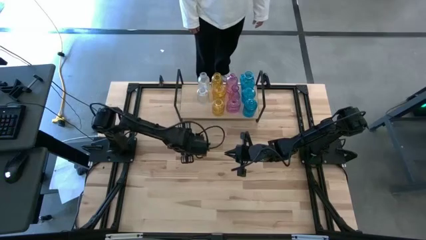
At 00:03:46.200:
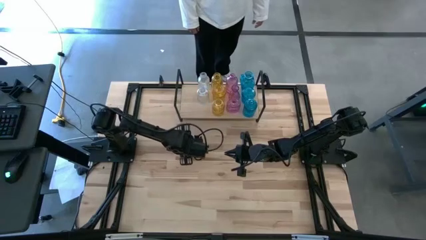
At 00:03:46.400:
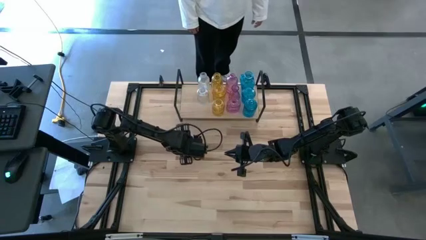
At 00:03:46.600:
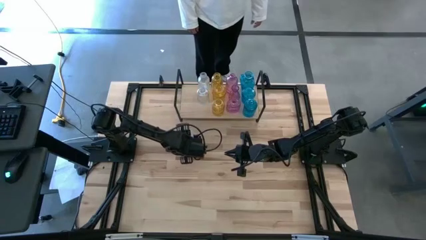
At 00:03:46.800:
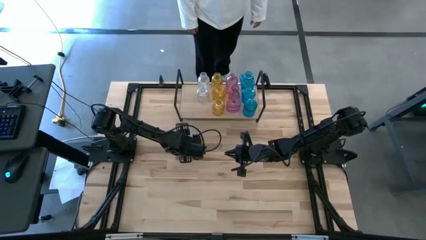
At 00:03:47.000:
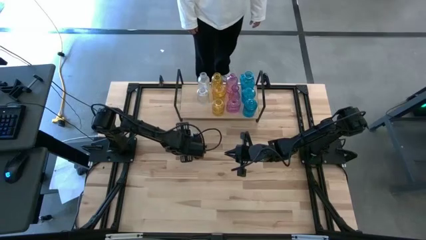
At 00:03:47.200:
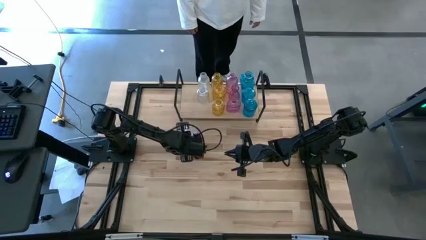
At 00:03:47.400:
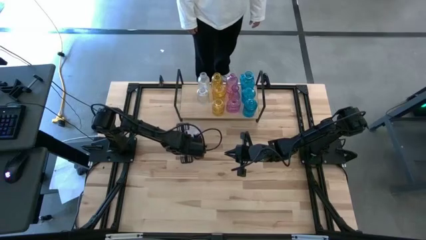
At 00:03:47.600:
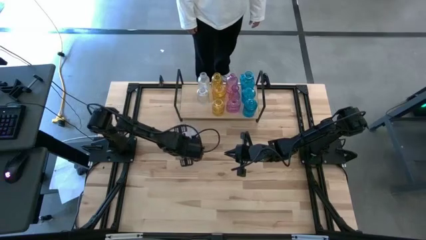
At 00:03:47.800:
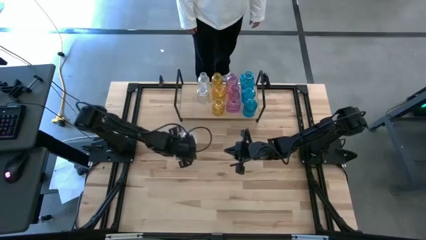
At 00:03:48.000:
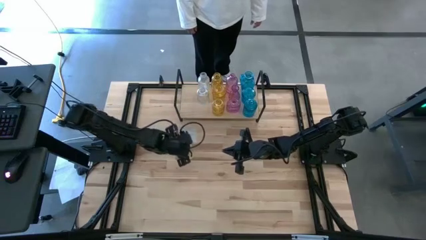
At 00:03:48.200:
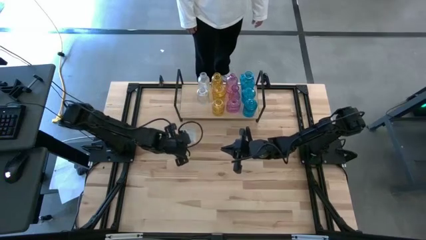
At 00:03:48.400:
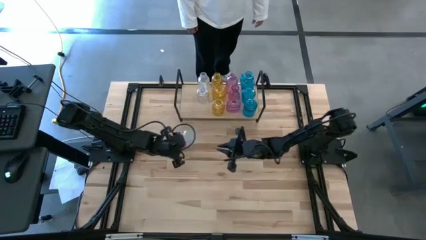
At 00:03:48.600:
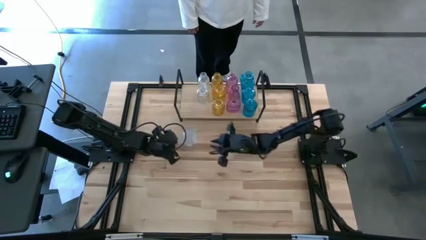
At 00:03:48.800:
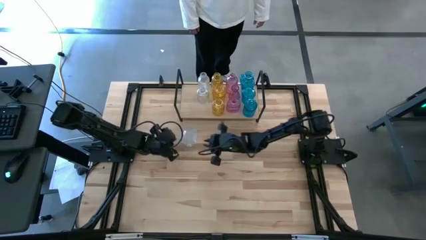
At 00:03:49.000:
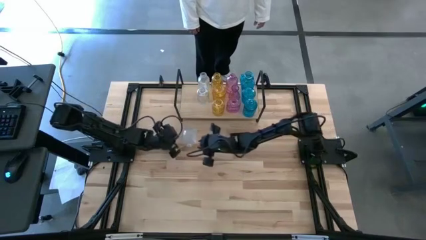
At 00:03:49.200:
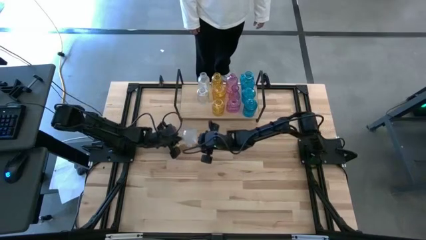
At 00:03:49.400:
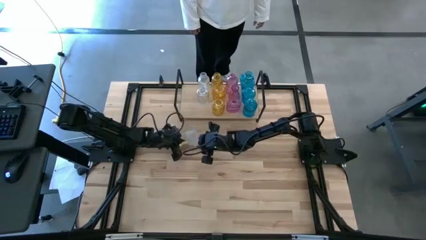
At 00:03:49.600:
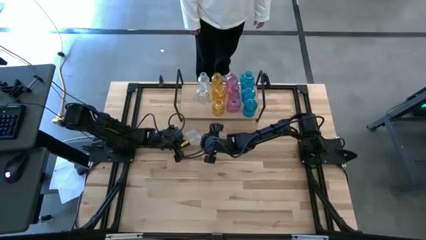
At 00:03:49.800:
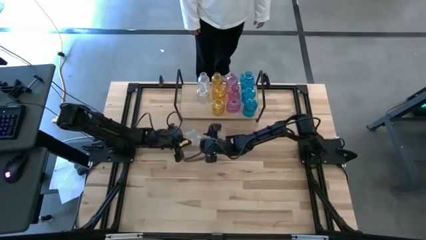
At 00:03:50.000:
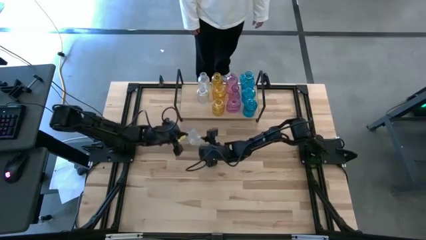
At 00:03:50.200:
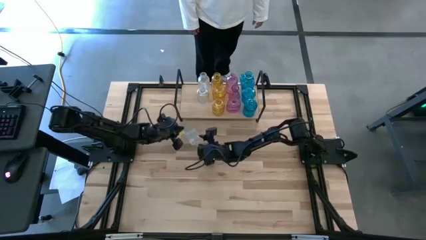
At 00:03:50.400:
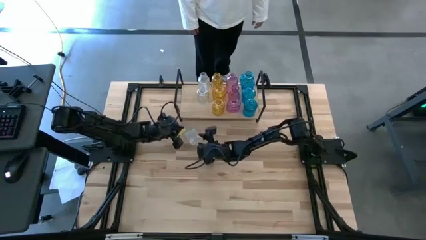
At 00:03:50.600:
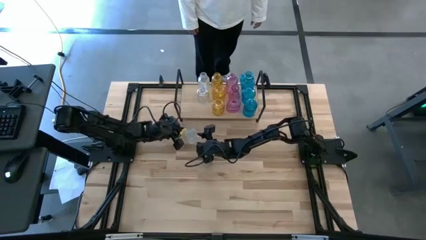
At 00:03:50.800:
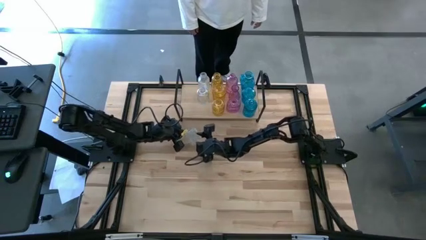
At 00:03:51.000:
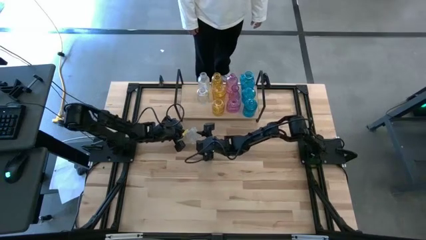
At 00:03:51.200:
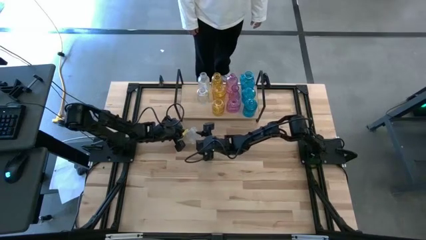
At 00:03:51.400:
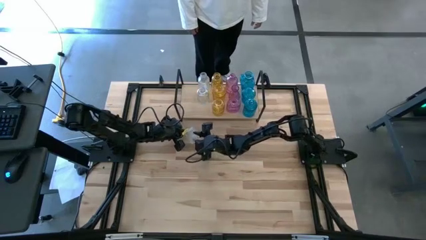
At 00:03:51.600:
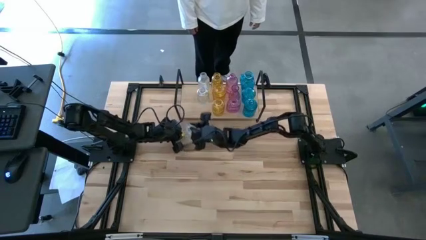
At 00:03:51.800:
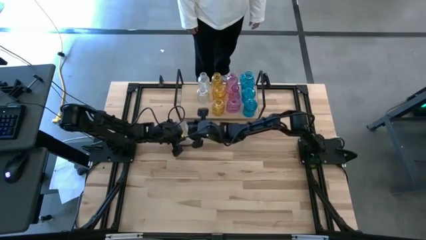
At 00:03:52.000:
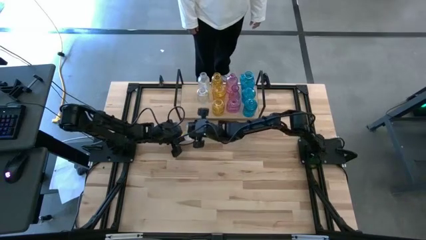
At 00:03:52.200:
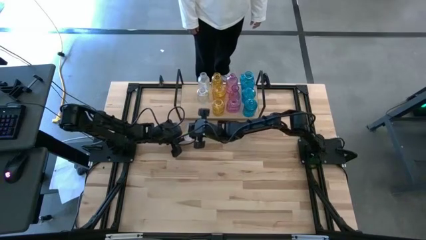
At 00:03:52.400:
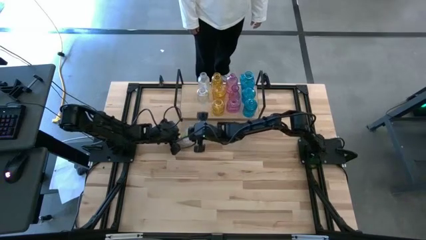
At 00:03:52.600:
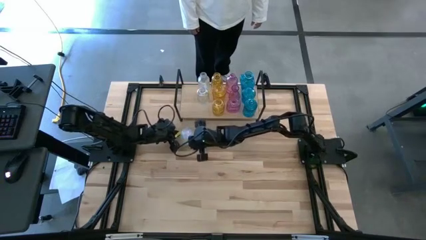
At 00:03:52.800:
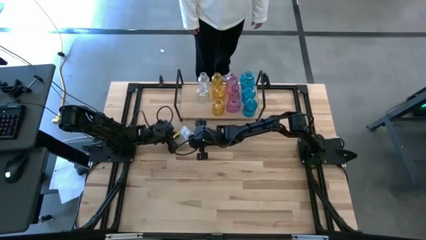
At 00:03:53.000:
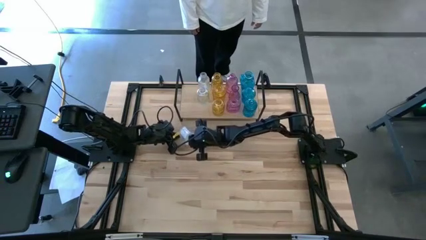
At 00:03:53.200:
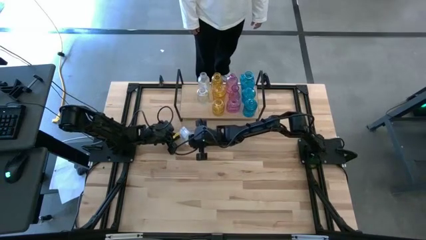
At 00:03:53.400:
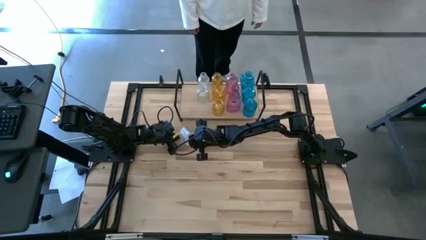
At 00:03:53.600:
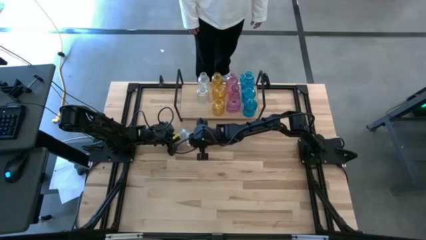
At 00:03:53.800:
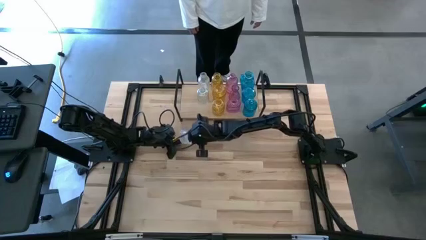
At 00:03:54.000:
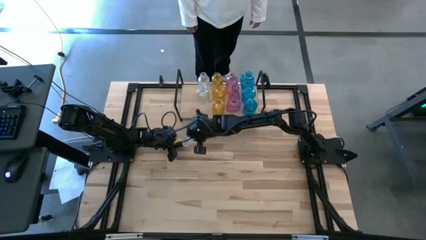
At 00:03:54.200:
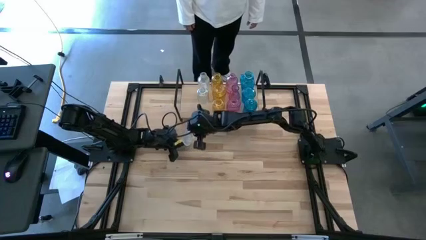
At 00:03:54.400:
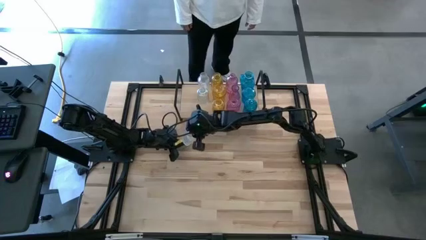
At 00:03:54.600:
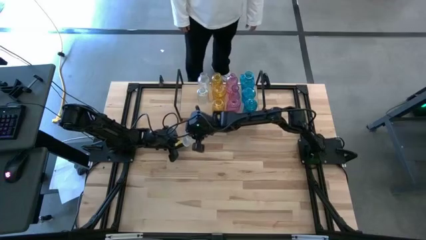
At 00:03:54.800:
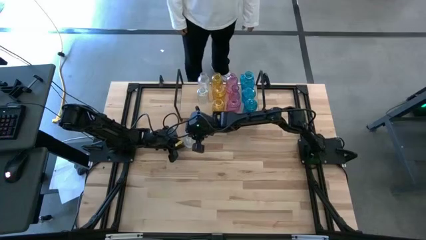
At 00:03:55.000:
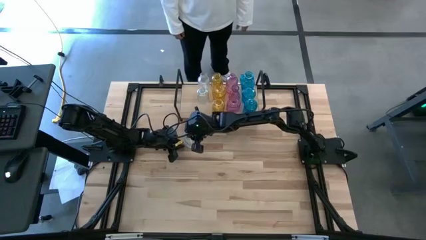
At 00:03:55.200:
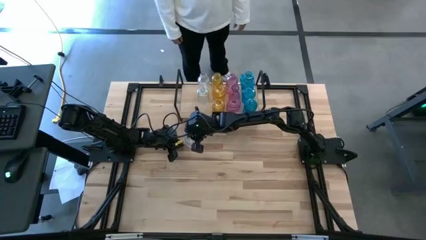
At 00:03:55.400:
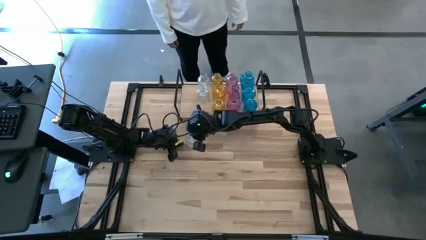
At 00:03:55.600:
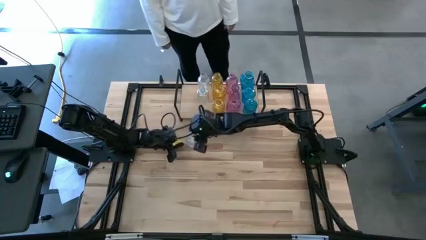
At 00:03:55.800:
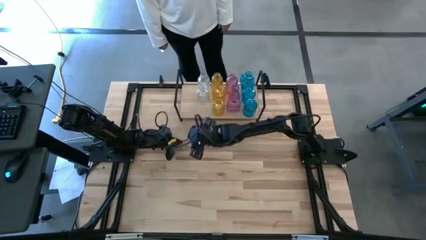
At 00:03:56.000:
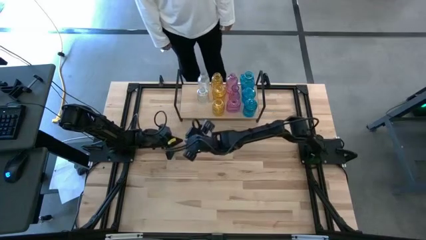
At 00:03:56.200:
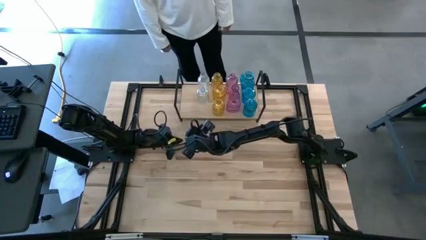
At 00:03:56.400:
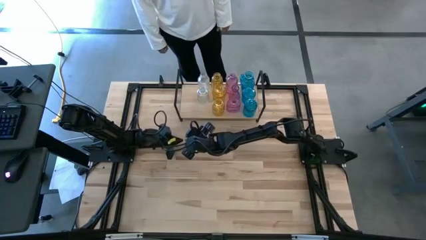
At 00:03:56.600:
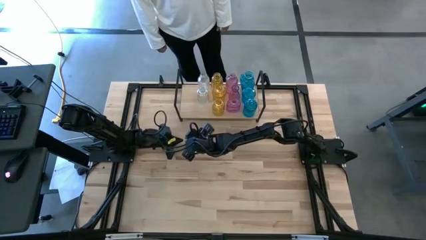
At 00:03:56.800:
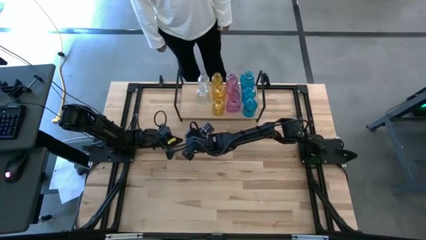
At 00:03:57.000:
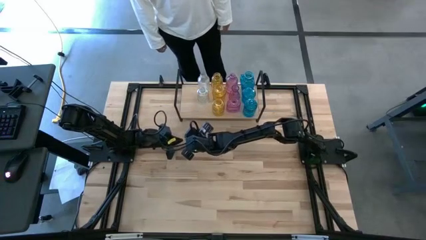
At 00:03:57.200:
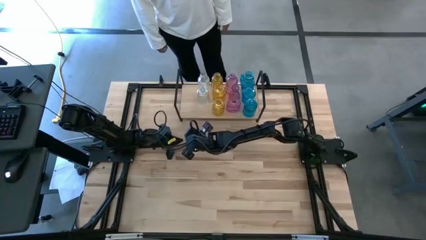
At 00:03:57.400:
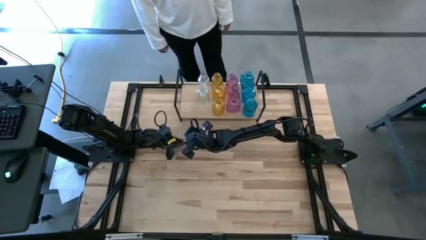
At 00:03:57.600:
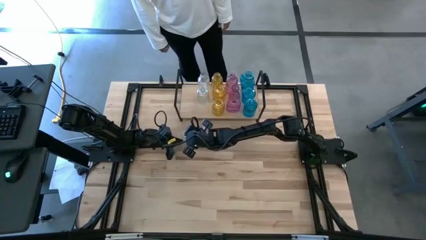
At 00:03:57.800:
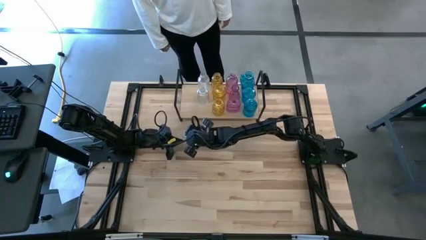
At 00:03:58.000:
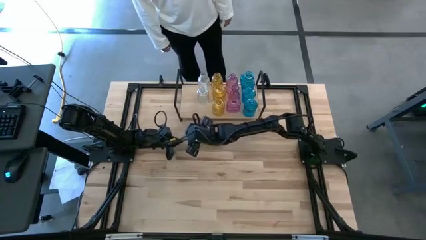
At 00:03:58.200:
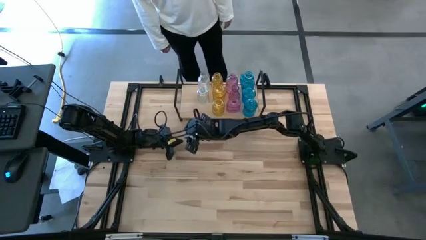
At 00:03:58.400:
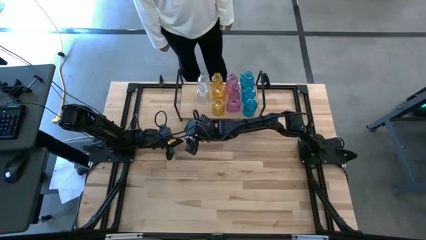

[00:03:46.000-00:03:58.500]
Task: sort vases onto shelf
Put the transparent vase on the shelf aligned with the other transparent vases

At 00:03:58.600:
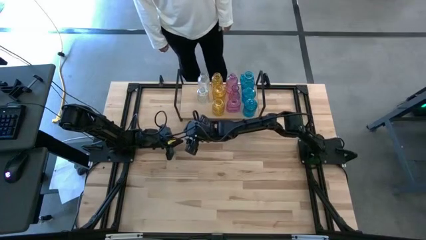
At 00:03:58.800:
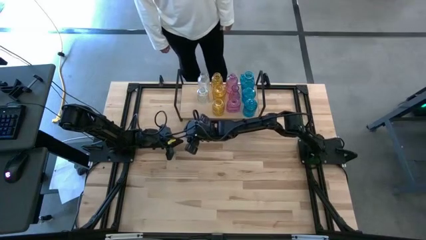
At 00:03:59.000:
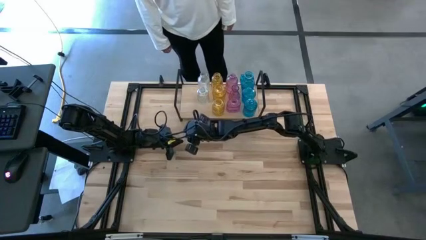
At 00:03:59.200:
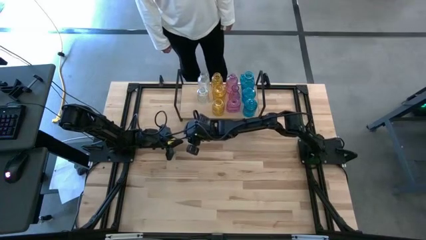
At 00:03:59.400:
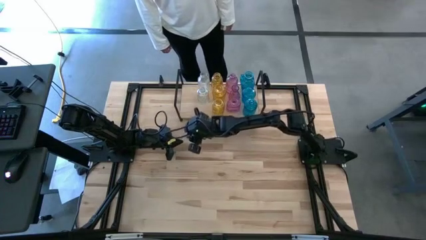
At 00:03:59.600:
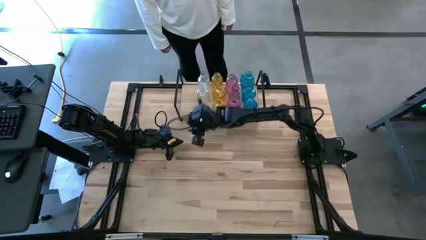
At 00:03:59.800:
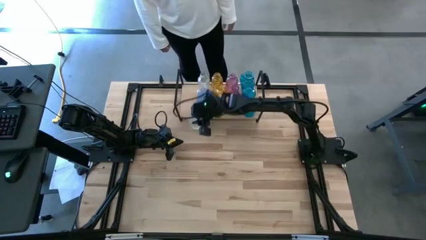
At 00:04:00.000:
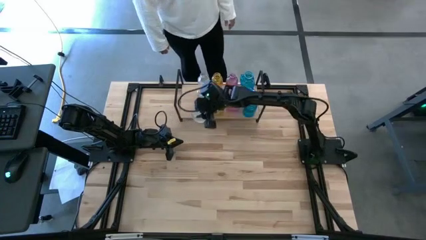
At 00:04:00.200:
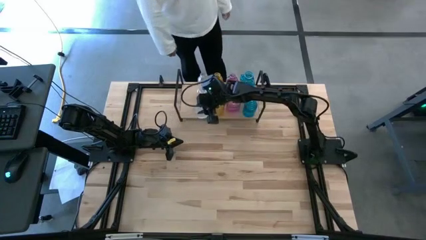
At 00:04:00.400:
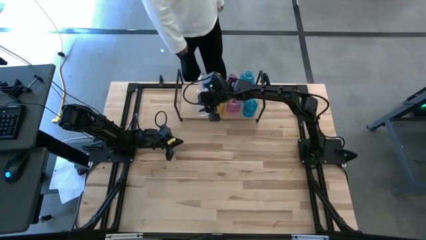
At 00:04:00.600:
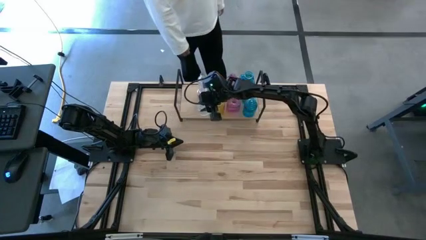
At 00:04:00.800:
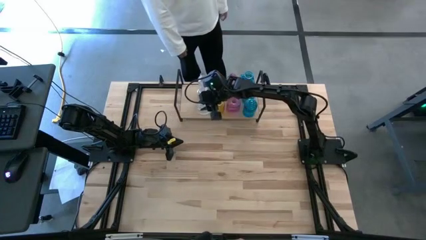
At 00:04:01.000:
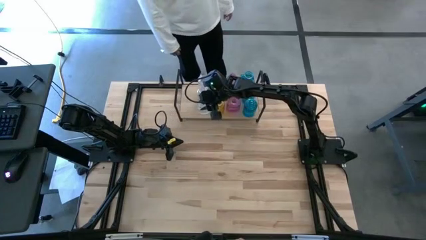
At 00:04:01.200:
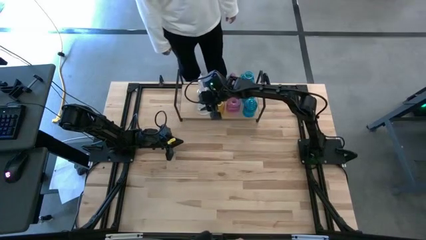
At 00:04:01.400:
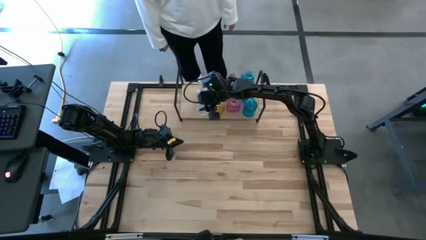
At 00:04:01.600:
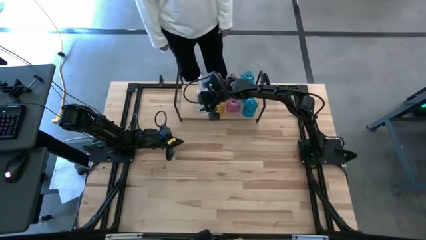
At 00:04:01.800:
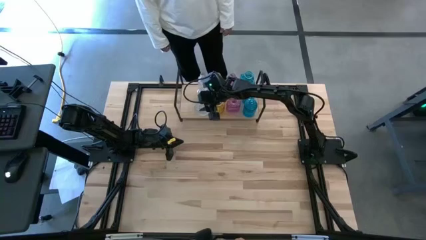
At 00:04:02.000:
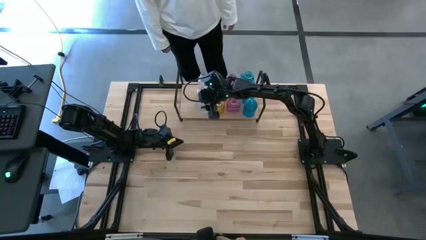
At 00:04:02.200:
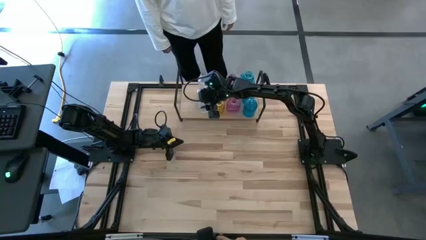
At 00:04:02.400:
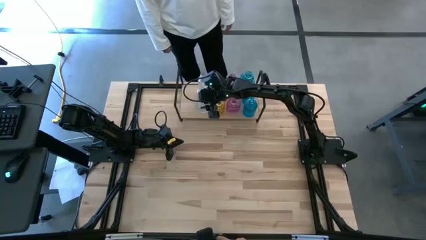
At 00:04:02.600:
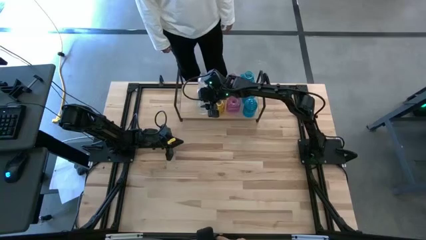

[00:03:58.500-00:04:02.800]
Put the transparent vase on the shelf aligned with the other transparent vases
